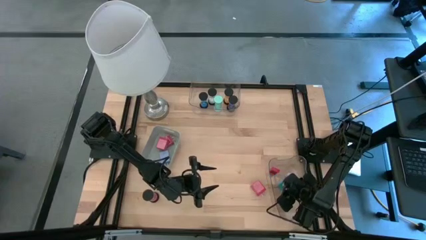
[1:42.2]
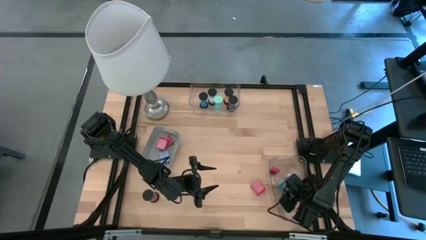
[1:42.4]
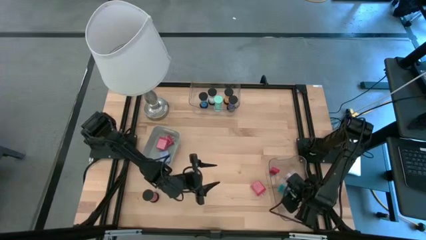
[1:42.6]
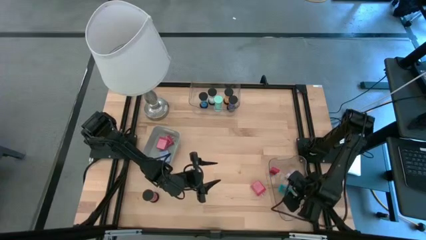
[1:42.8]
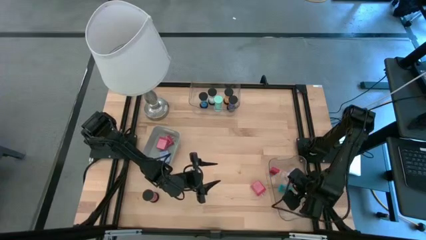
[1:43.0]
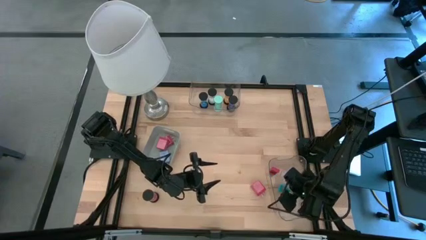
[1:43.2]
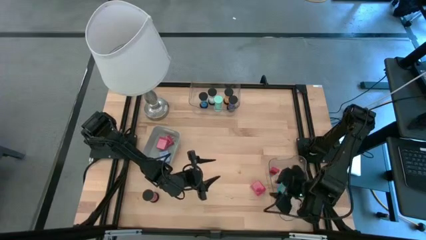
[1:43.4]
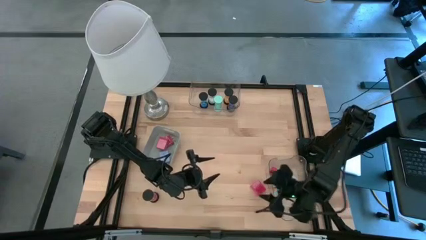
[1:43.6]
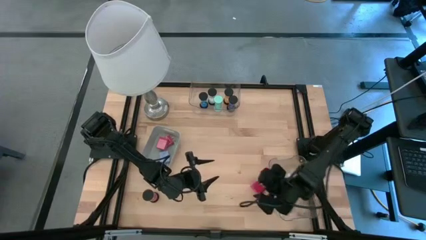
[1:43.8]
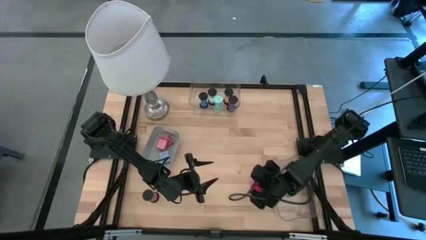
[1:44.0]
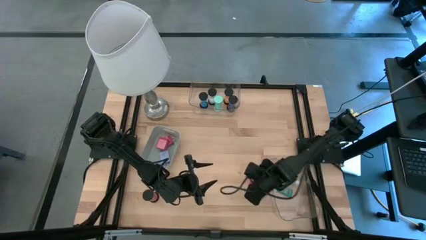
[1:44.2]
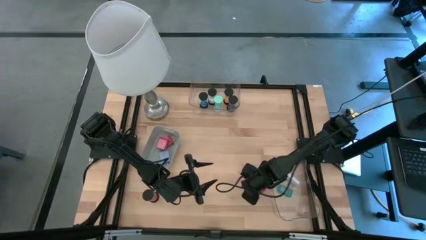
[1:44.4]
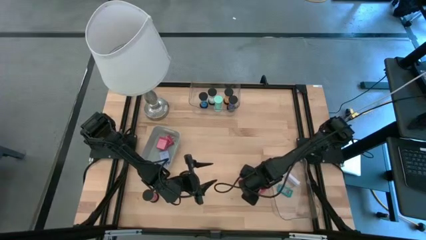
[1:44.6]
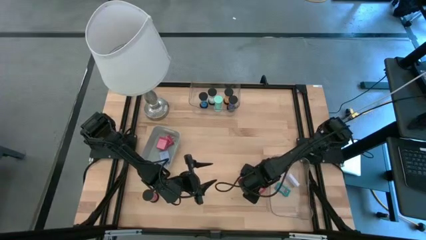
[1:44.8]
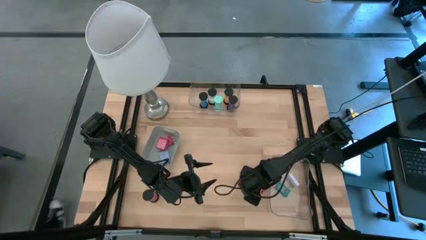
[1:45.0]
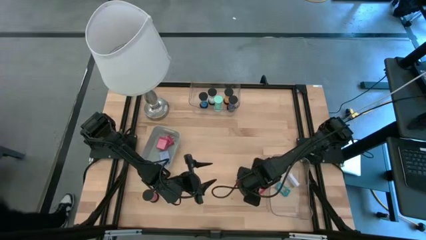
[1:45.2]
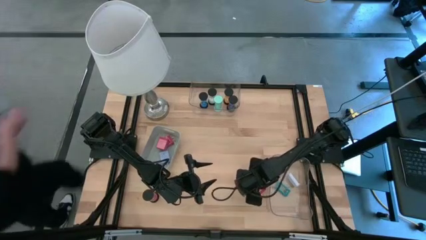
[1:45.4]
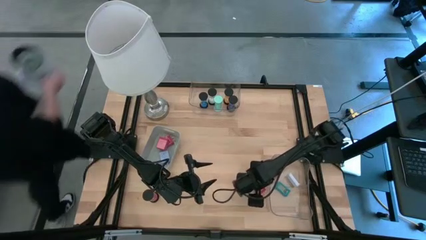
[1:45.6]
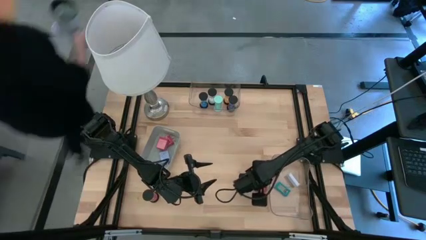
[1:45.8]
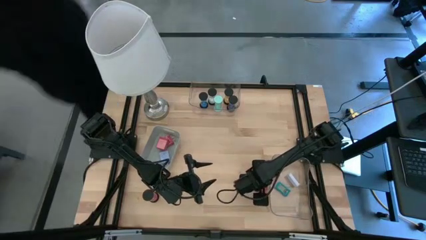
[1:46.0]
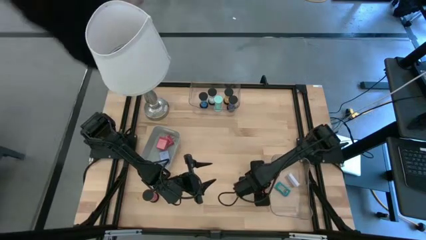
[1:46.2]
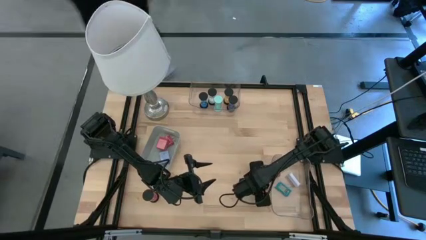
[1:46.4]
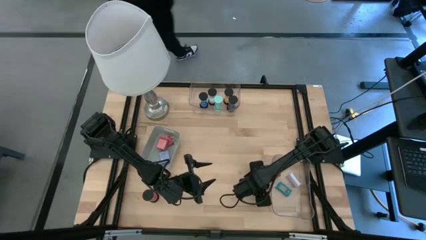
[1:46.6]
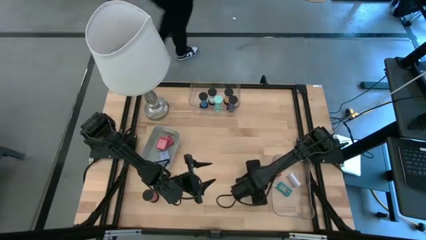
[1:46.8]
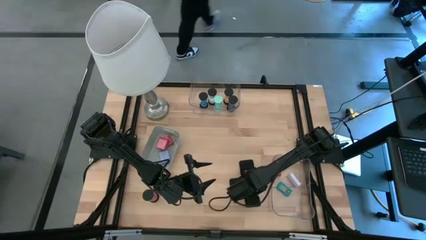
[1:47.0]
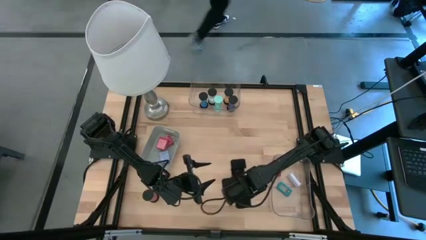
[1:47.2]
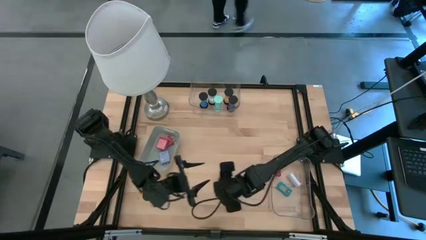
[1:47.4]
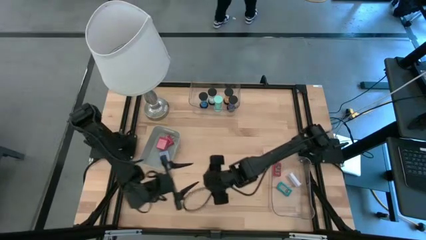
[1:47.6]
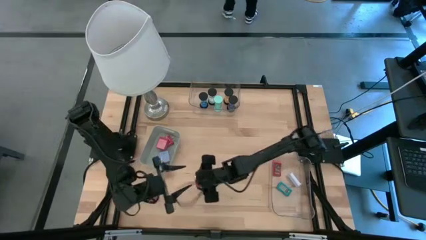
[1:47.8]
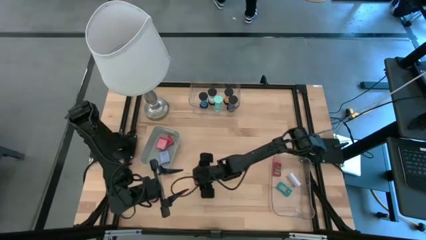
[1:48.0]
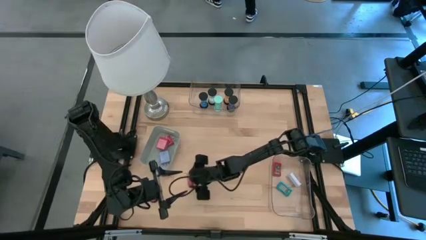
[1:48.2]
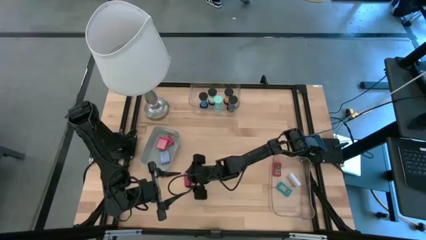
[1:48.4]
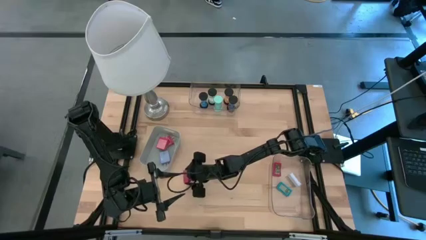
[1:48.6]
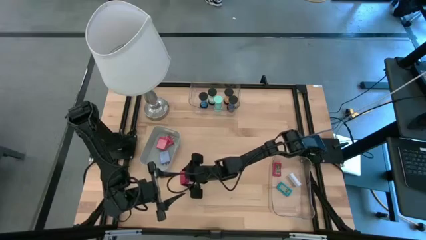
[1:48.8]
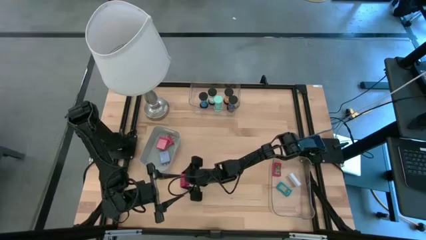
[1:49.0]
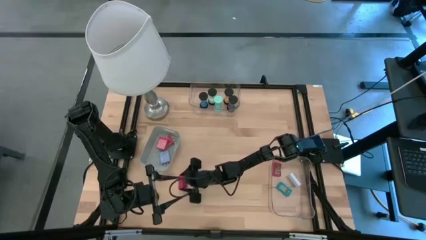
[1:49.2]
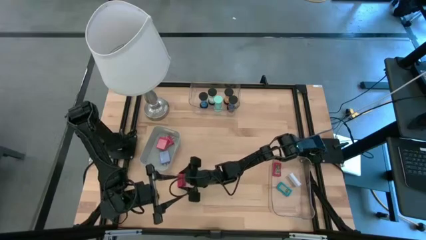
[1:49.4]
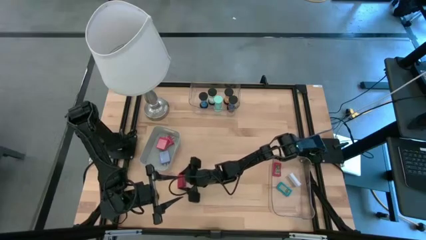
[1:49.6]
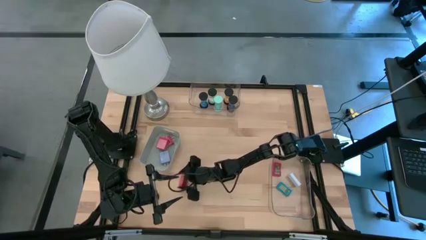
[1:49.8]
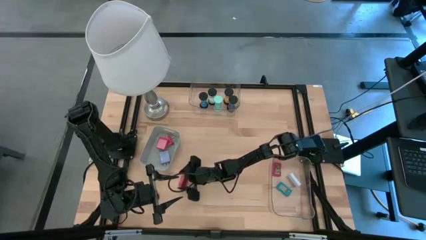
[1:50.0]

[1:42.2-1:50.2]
Task: Pick & Place Office items
Put the red charger adapter into the gray bin

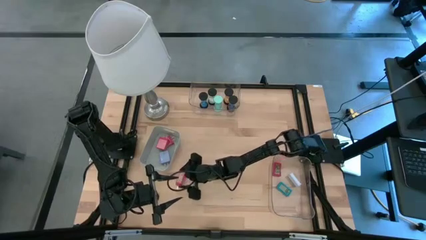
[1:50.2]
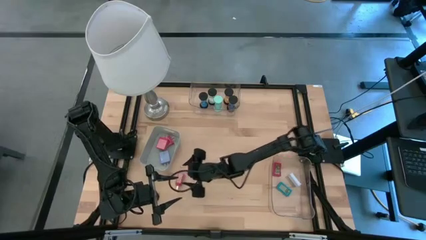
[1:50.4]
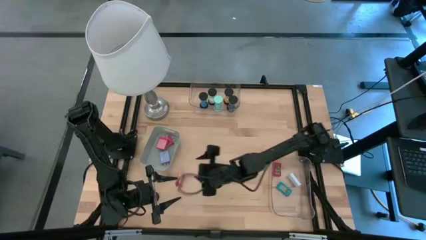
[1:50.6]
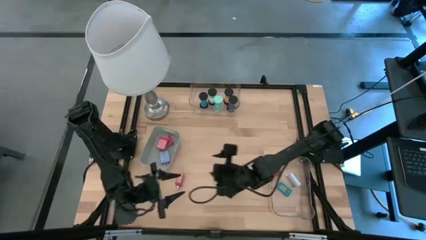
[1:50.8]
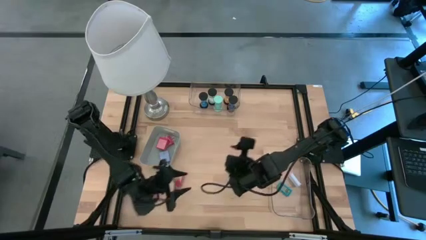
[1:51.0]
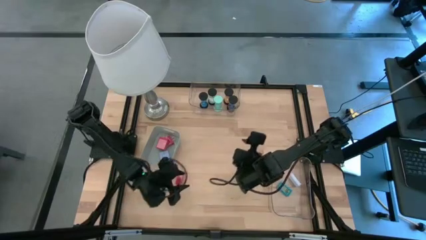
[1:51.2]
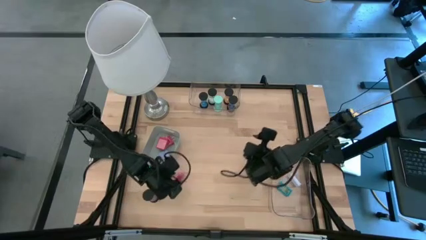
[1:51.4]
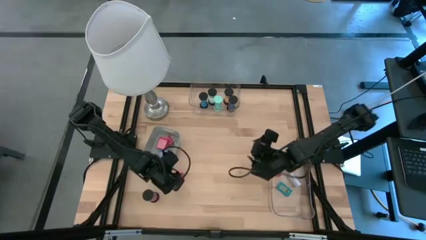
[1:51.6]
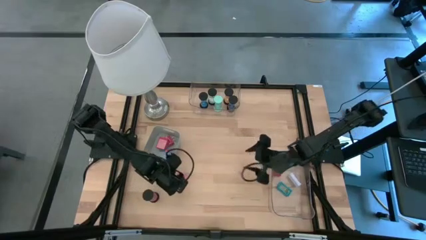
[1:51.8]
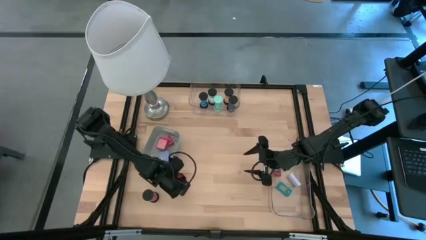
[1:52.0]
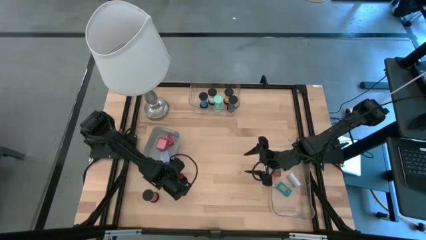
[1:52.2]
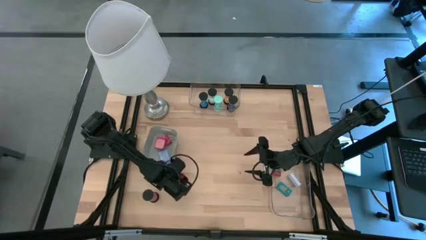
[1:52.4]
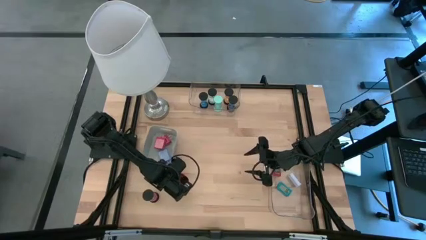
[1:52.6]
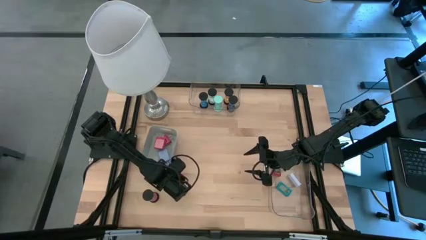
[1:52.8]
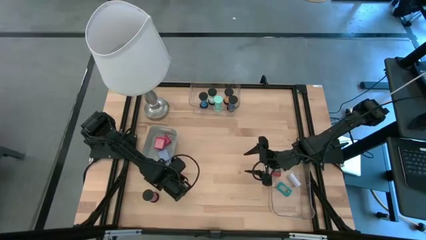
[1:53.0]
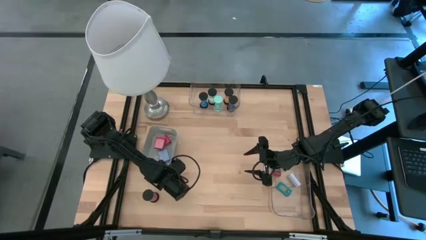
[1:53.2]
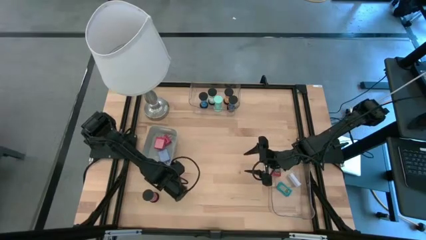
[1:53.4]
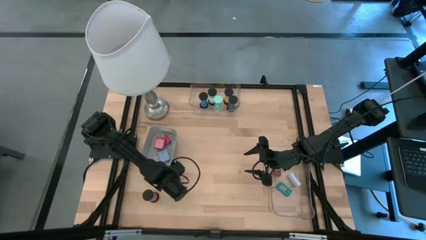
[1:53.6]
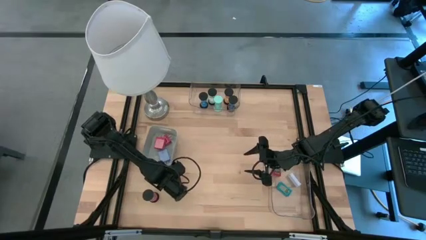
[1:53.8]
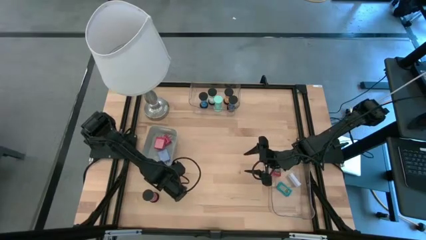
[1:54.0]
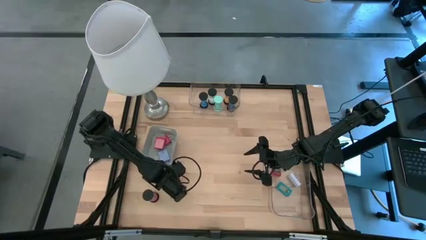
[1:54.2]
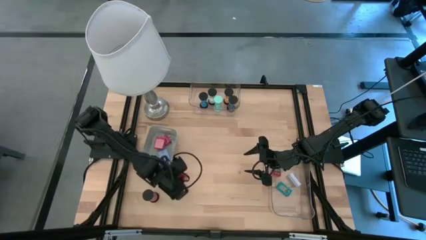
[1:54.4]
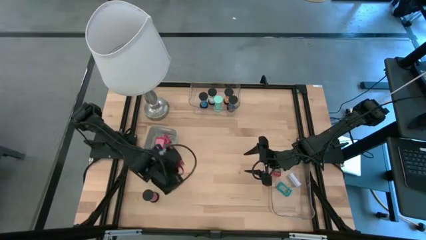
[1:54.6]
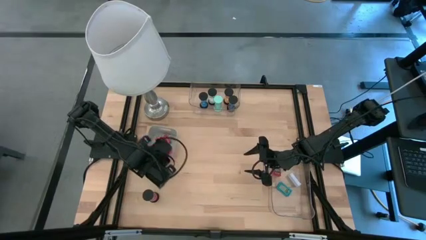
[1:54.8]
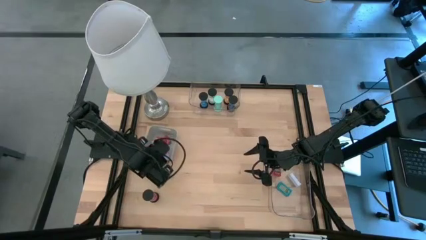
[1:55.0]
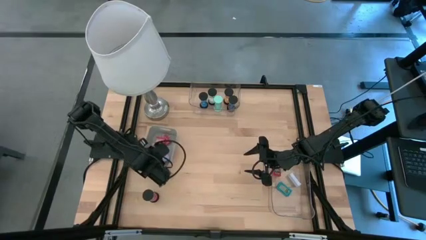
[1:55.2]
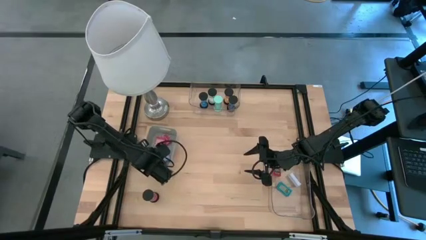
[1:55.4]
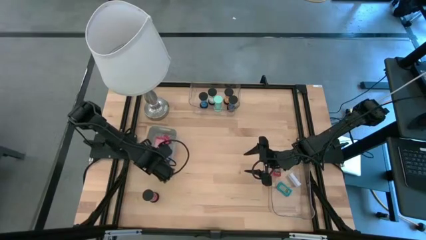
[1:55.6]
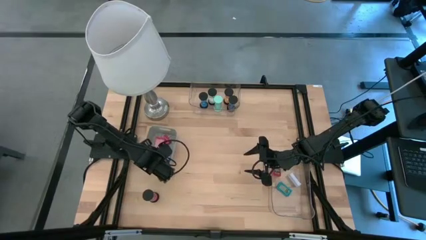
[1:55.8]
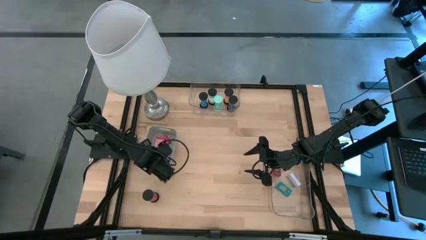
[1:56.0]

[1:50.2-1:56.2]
Put the red charger adapter into the gray bin

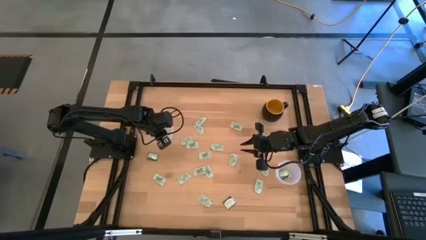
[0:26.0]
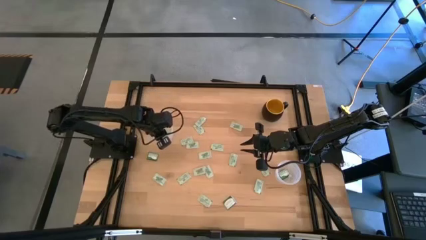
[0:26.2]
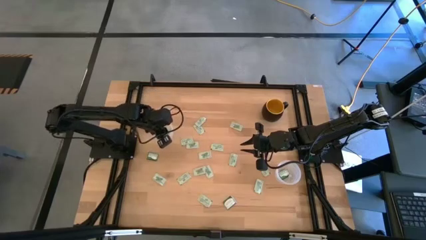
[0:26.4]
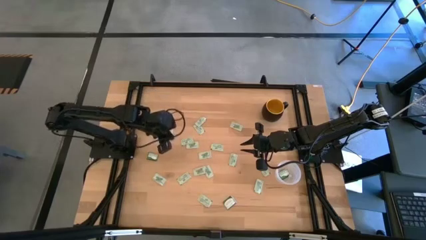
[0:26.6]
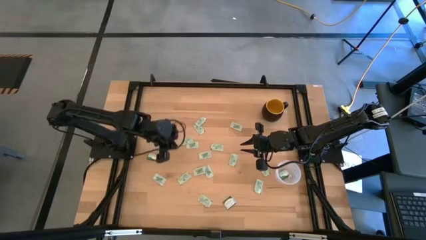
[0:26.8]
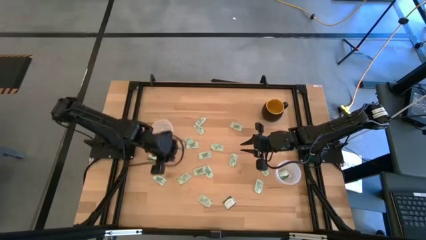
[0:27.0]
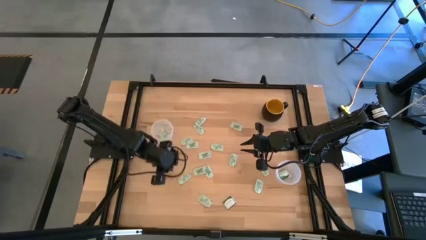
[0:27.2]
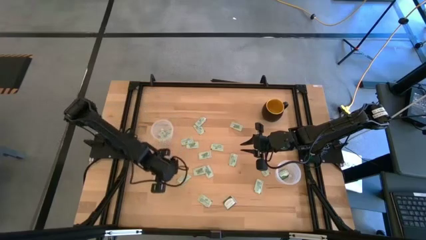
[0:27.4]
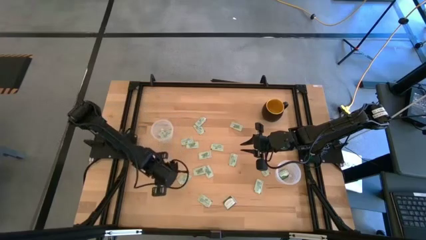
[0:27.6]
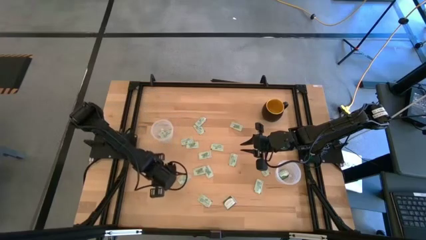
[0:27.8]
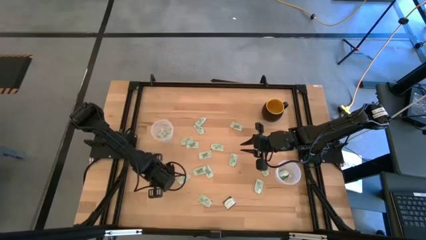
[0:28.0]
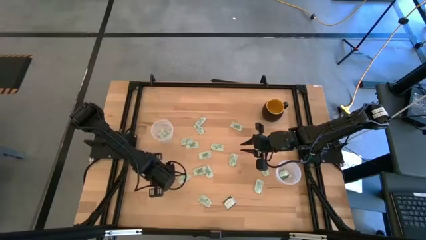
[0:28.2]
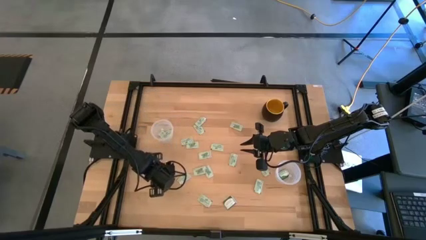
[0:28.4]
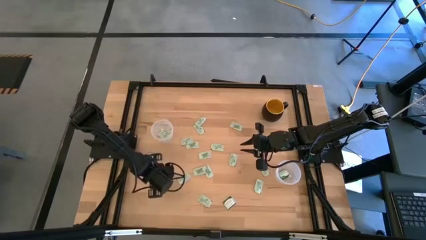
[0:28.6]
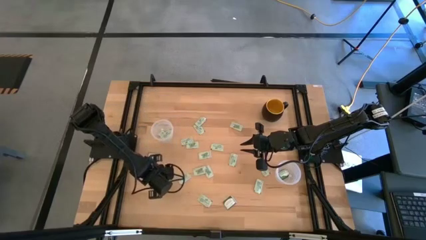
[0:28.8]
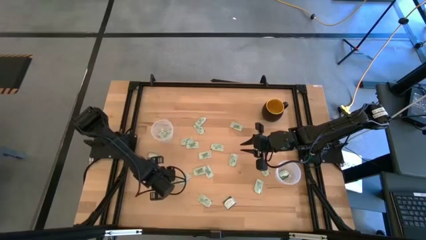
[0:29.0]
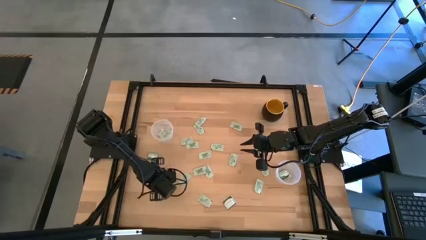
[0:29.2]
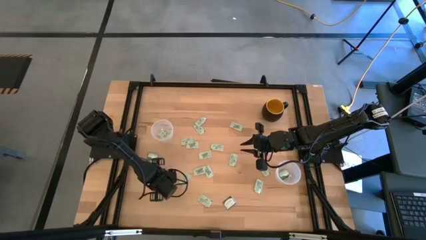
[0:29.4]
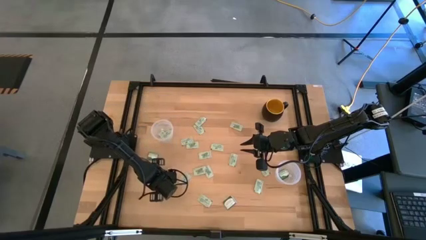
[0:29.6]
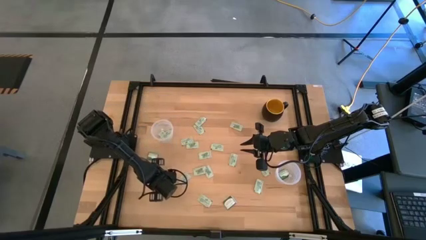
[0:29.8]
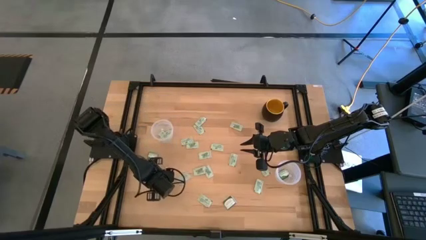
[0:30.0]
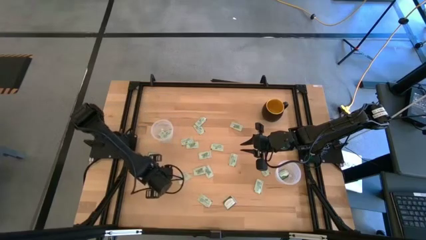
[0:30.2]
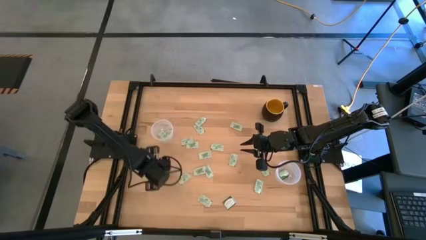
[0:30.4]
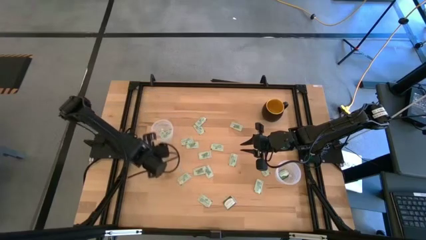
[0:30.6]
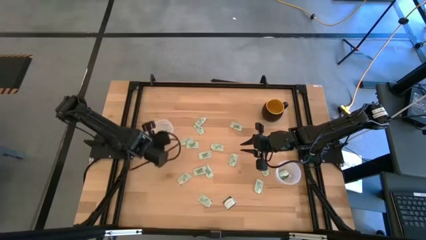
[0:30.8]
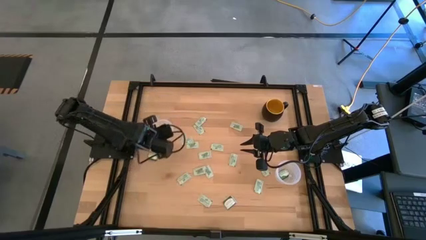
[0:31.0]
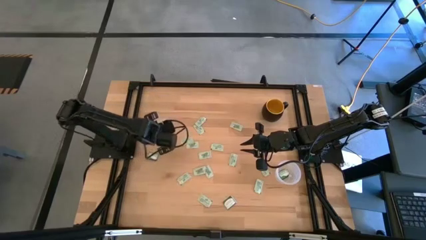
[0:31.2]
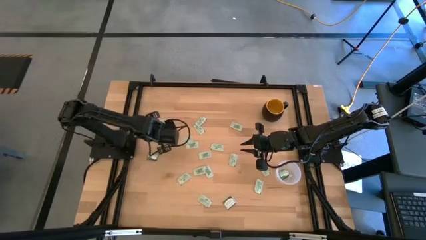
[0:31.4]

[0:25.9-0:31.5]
Task: Pick and place Stevia / Truvia into bins
Put the white stevia packet into the left transparent container
